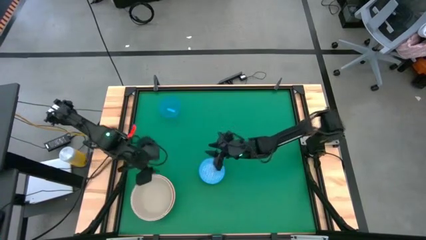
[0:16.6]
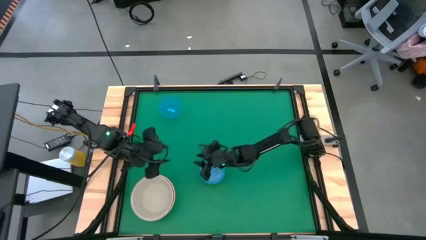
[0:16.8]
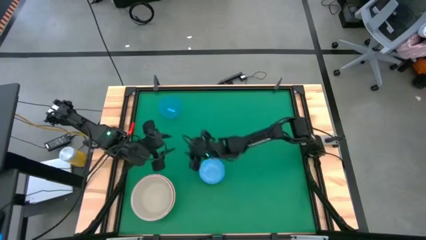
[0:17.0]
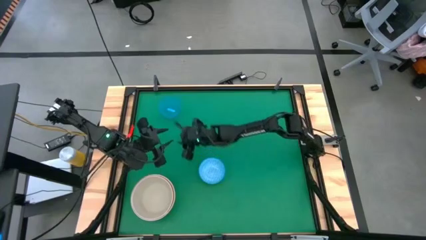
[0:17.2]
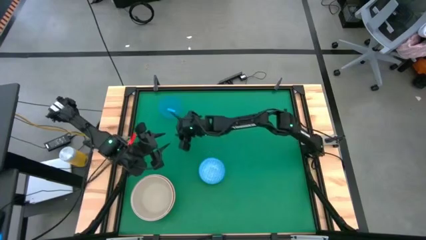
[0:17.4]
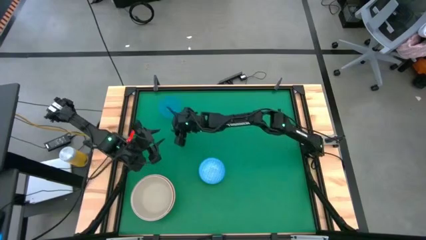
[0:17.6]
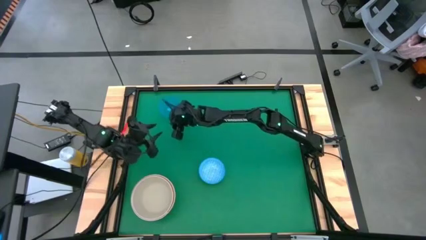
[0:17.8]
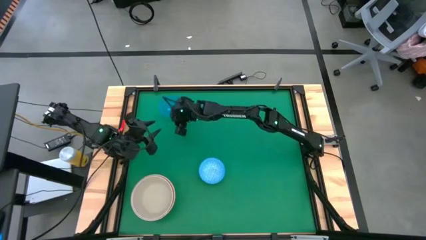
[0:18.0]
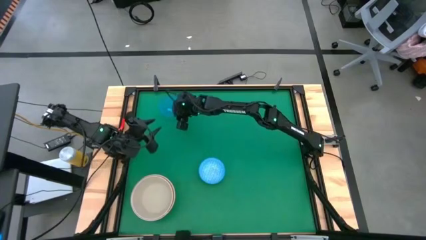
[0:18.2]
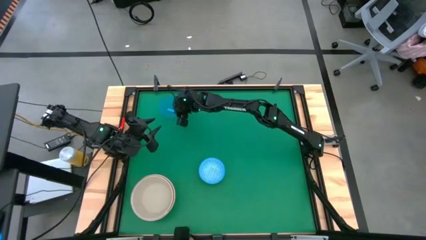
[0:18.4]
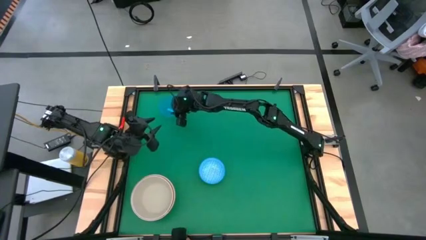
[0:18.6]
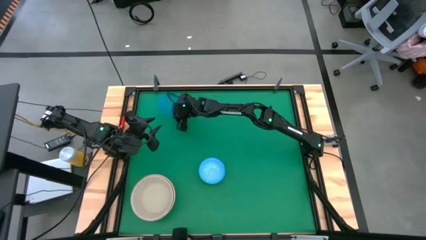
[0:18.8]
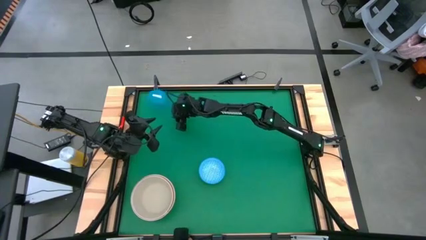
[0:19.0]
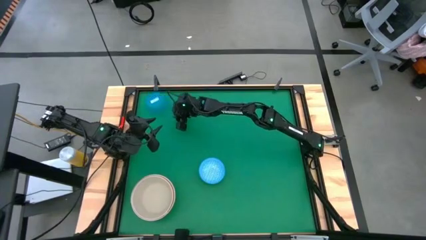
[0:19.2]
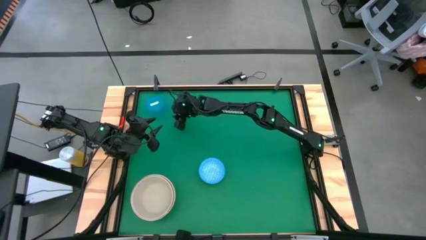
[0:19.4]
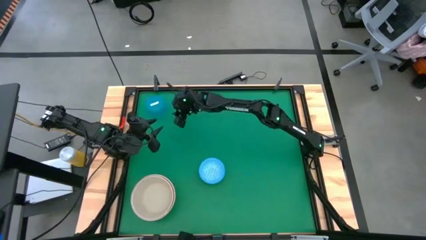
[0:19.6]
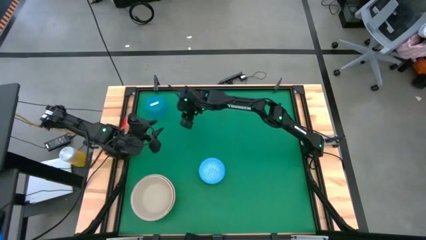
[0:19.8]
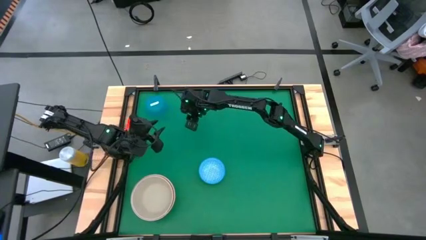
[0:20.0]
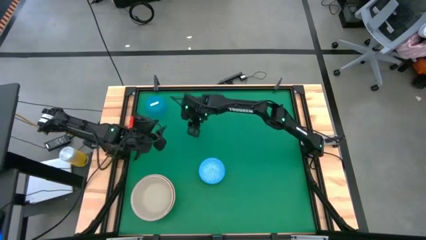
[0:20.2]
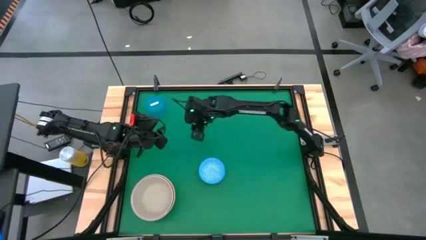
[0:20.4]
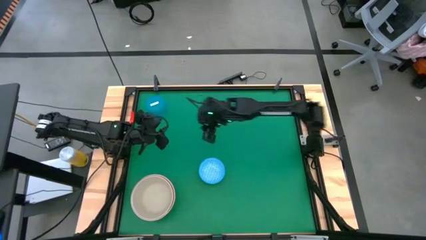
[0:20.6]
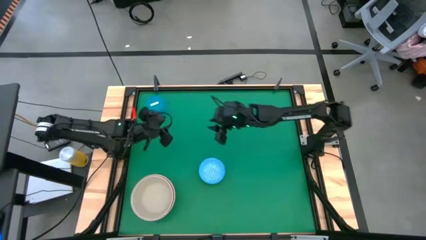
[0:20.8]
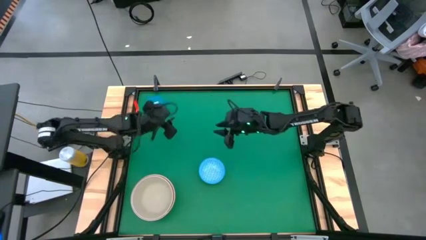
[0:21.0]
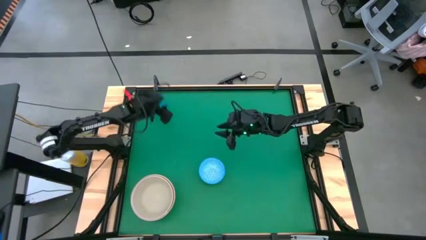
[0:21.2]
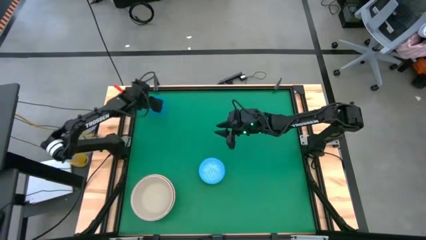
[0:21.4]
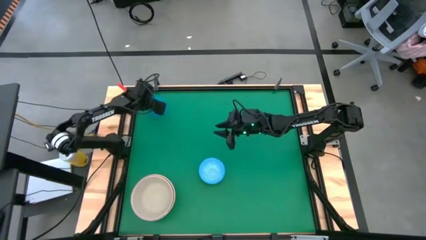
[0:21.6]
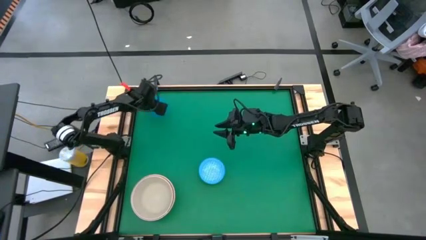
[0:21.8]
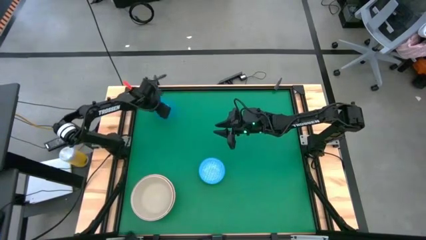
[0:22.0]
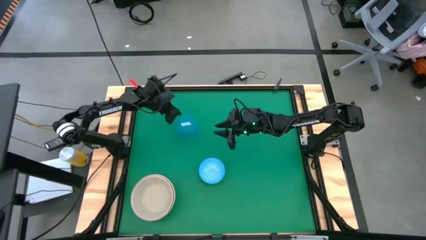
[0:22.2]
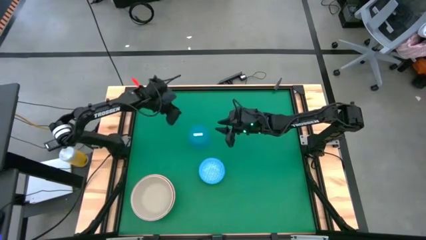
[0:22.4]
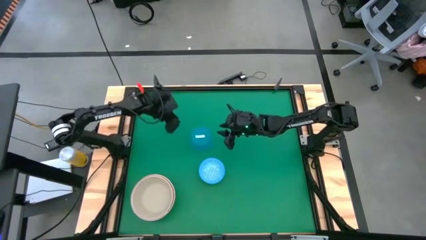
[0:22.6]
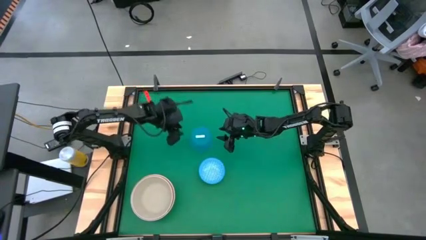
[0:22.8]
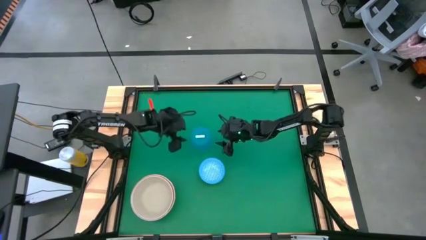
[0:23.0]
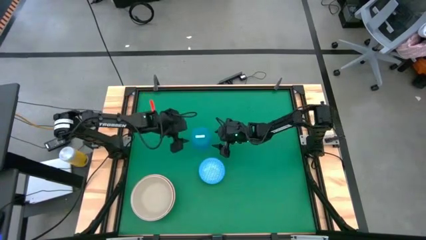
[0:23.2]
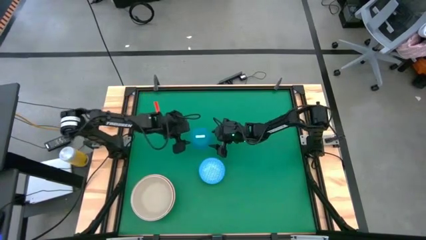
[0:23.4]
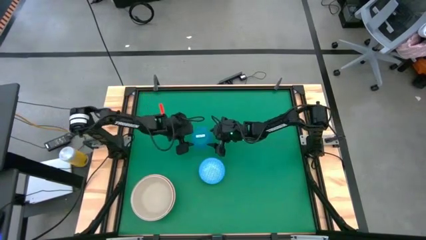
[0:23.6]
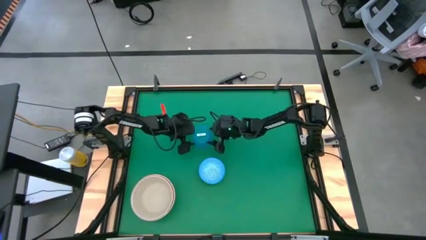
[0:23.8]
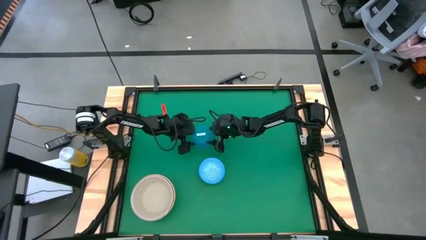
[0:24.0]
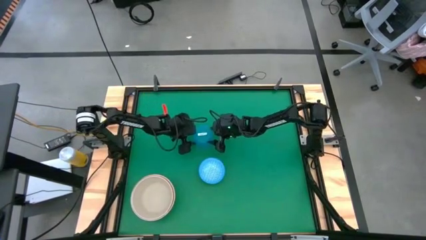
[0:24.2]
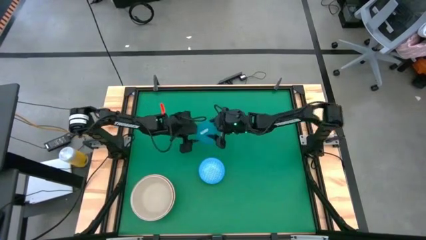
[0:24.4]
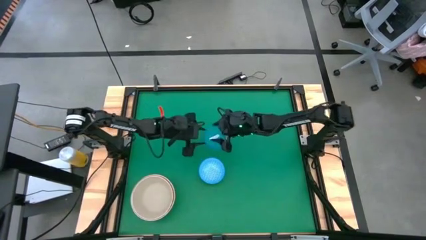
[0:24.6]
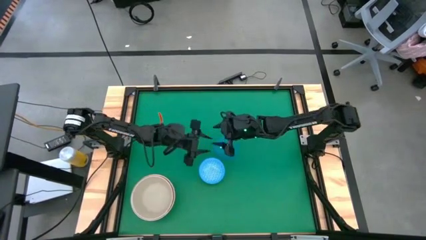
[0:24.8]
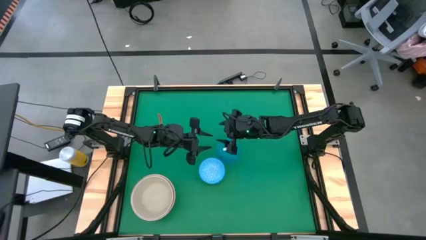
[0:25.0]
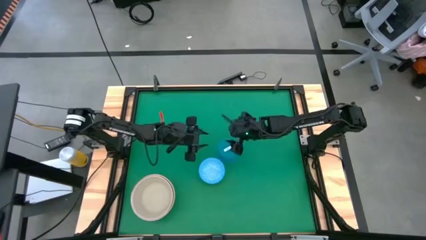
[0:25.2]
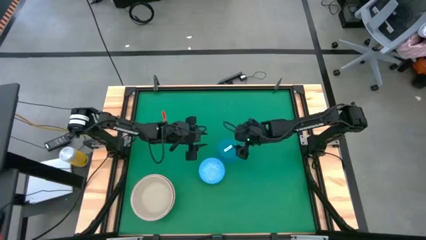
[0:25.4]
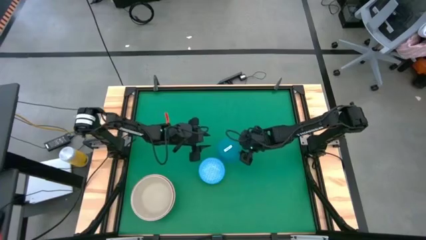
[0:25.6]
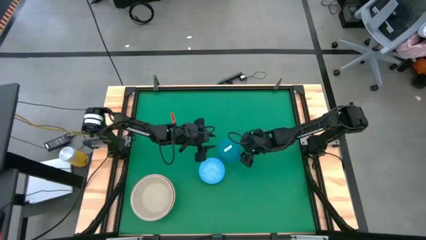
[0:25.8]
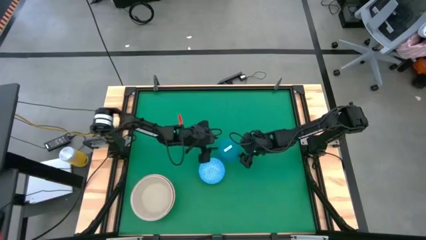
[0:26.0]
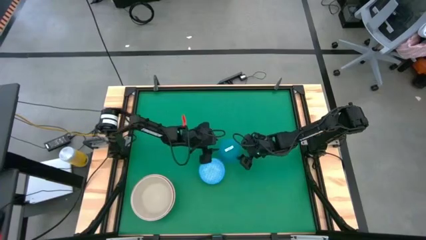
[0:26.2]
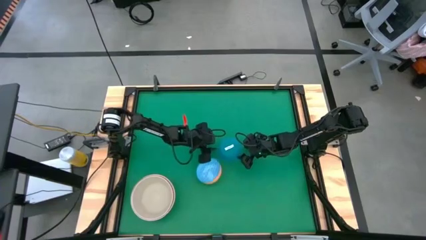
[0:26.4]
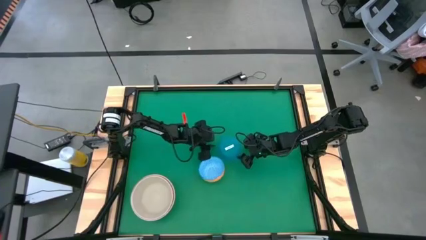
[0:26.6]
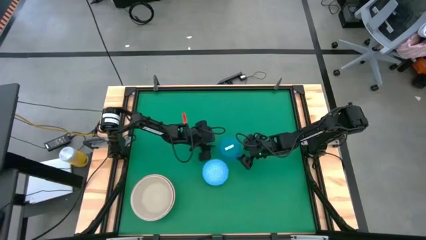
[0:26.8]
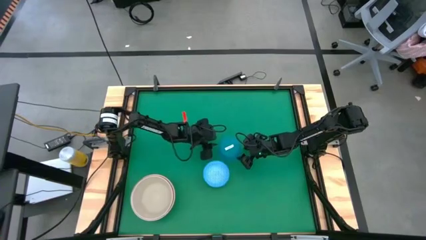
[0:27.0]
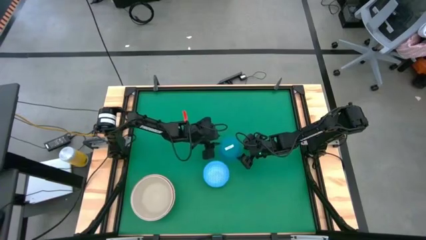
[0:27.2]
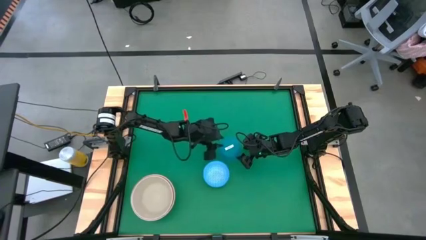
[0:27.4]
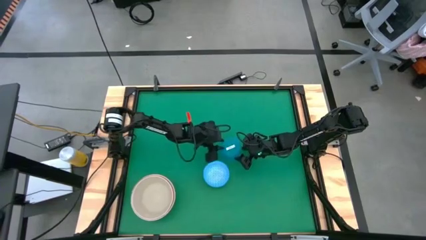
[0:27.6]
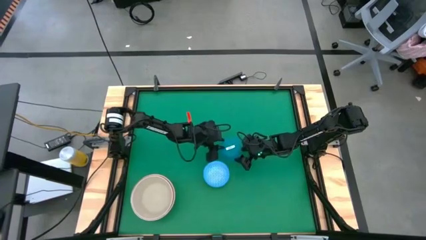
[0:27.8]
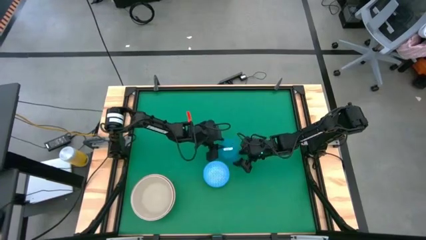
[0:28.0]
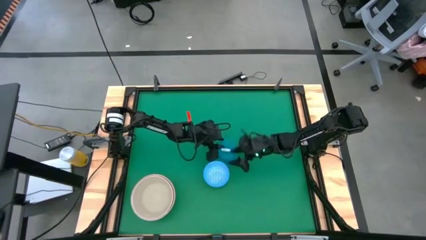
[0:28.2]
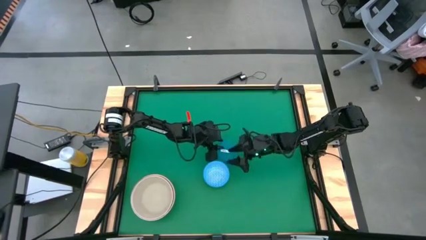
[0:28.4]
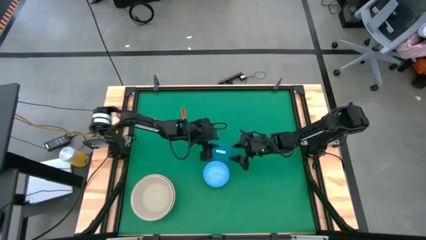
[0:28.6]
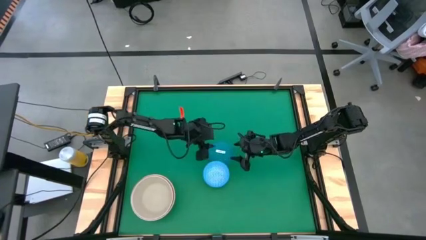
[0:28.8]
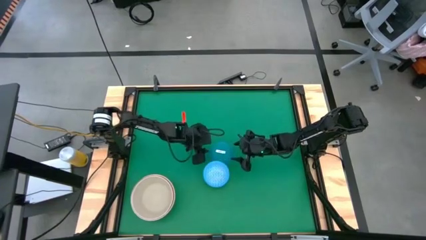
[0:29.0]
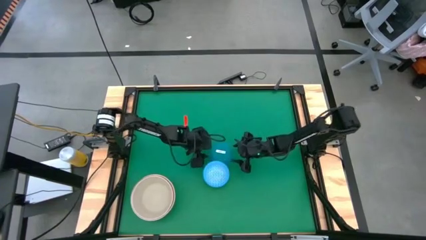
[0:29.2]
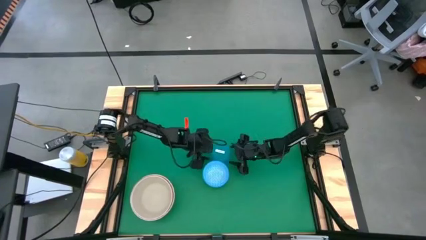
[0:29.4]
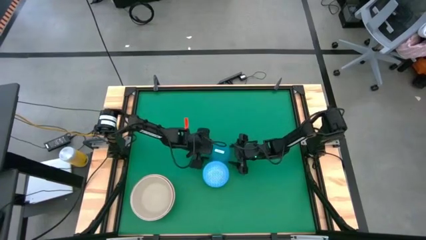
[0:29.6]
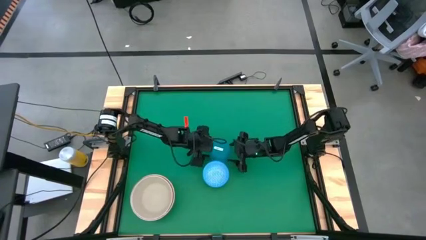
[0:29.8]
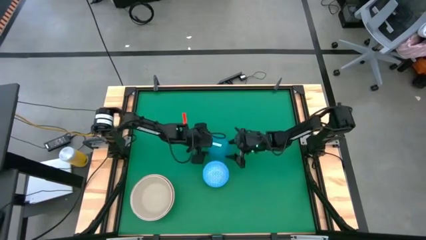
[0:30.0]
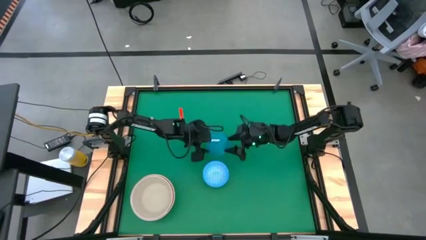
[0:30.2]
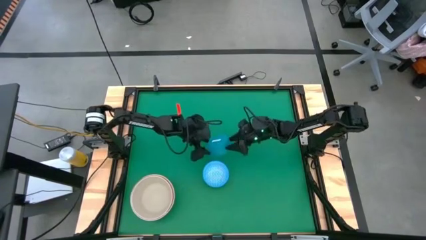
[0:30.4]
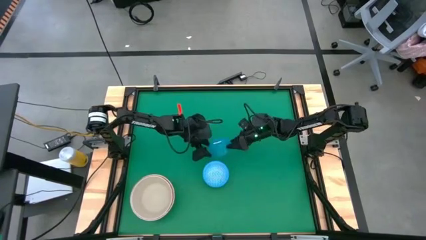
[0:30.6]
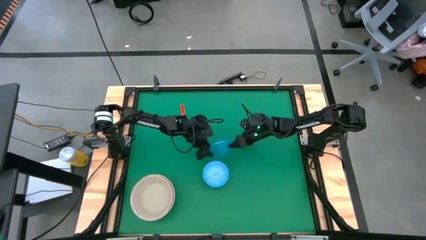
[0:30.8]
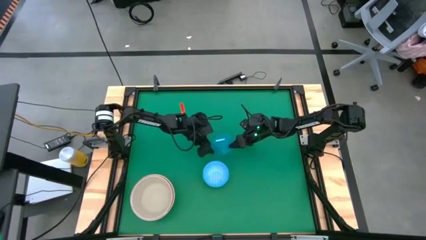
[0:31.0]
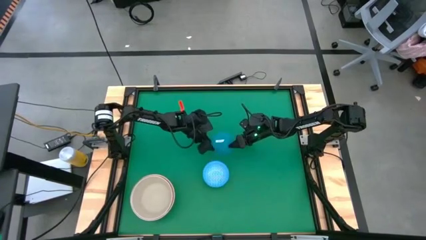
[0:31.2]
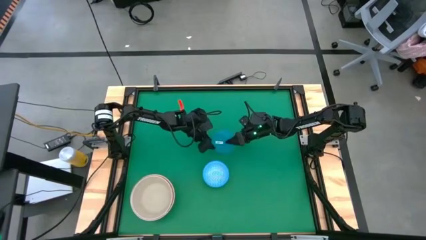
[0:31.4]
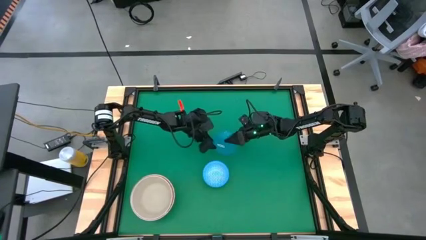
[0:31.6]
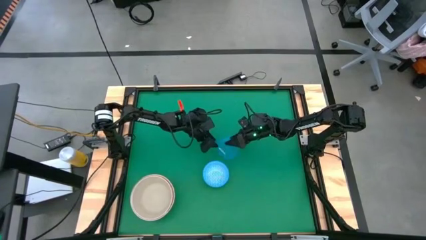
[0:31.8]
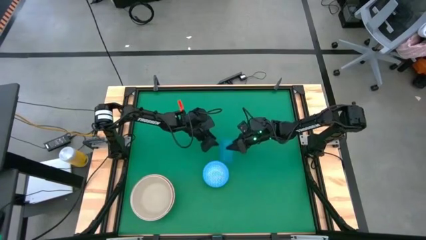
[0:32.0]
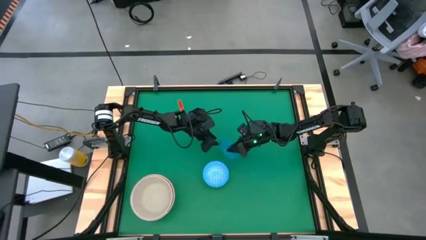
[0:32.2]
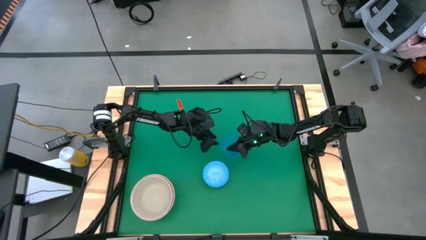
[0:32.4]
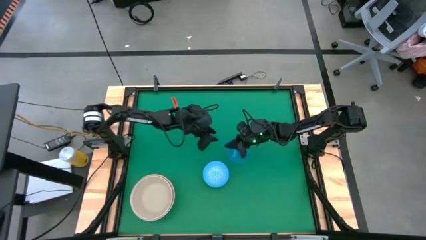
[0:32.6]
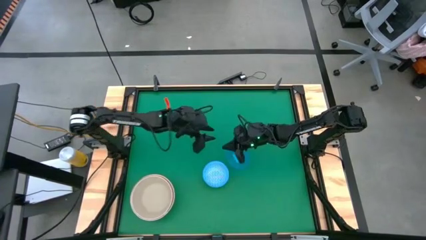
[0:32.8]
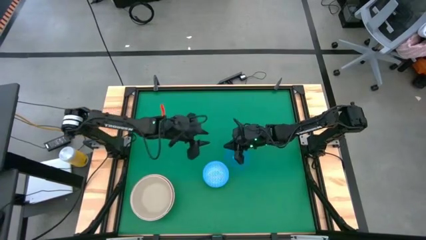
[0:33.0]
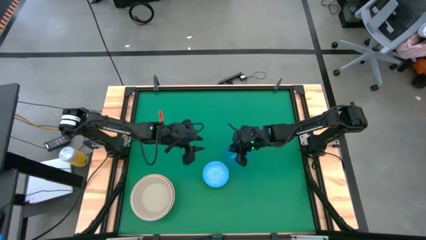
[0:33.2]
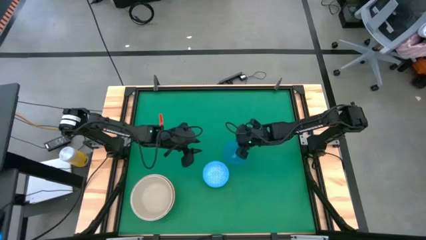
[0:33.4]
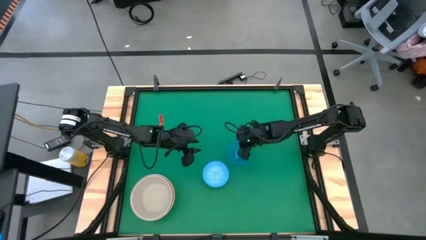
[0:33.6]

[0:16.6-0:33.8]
Stack the blue bowl on top of the brown bowl
